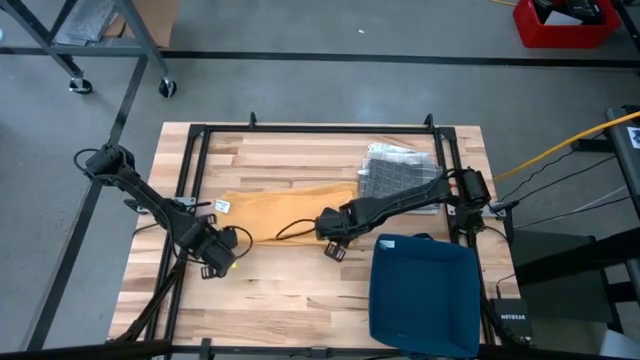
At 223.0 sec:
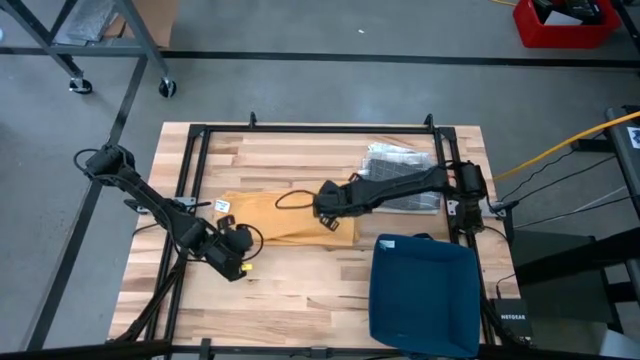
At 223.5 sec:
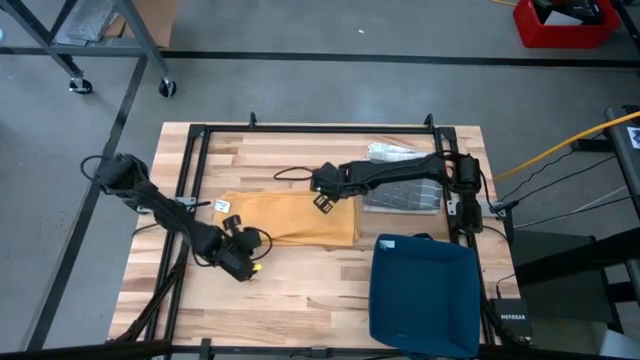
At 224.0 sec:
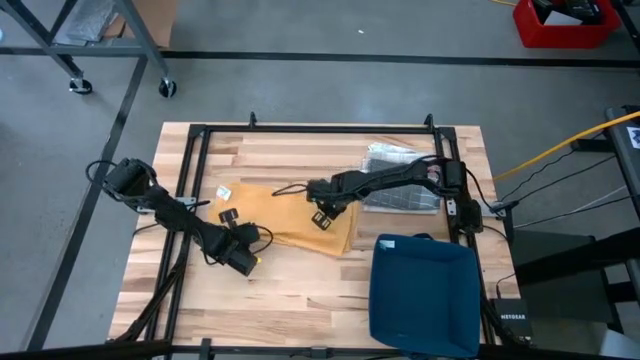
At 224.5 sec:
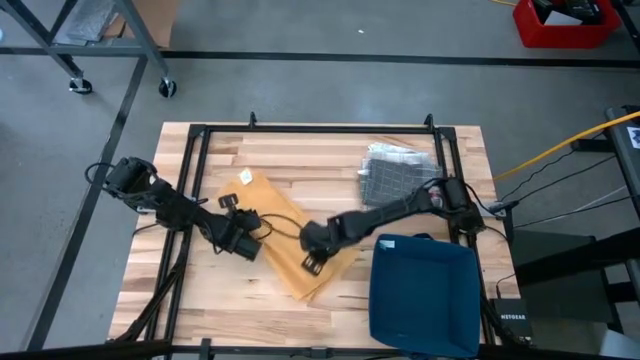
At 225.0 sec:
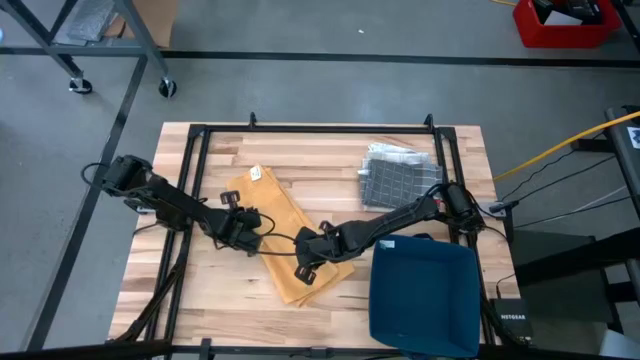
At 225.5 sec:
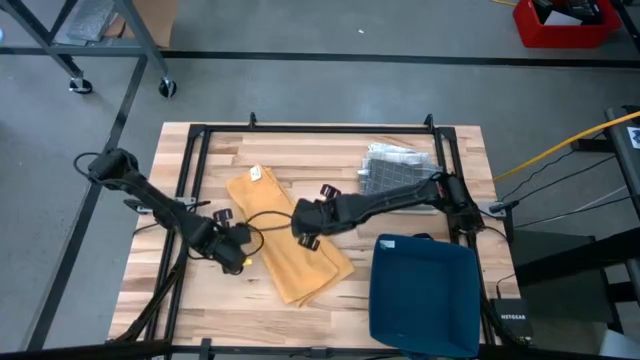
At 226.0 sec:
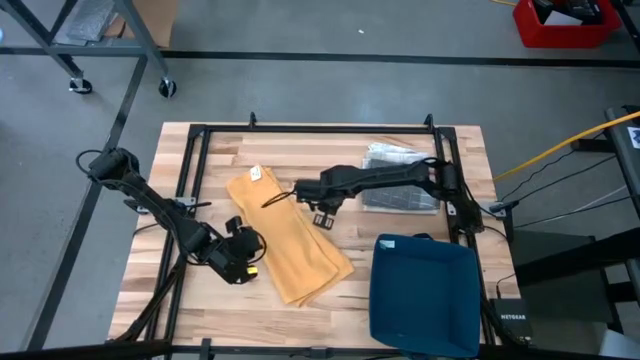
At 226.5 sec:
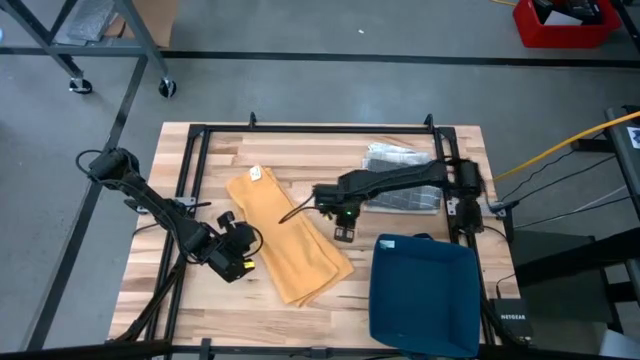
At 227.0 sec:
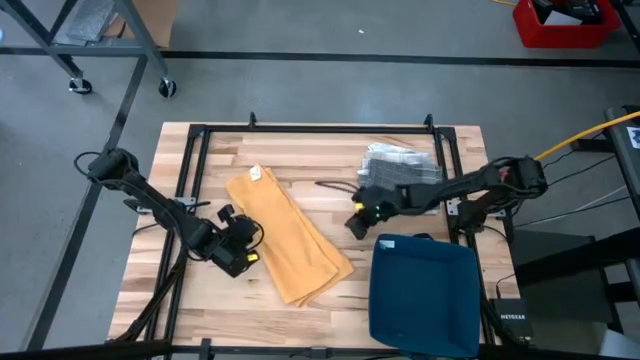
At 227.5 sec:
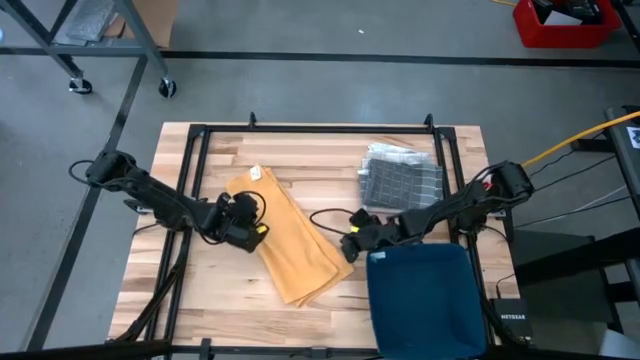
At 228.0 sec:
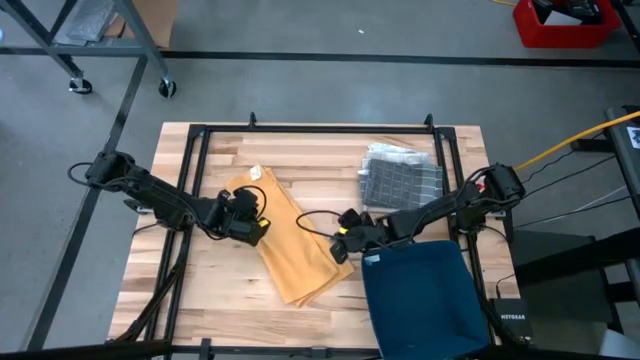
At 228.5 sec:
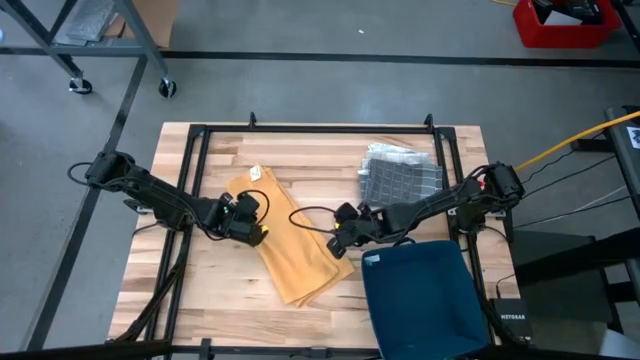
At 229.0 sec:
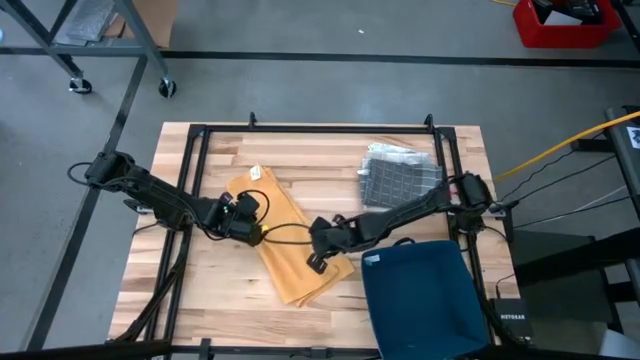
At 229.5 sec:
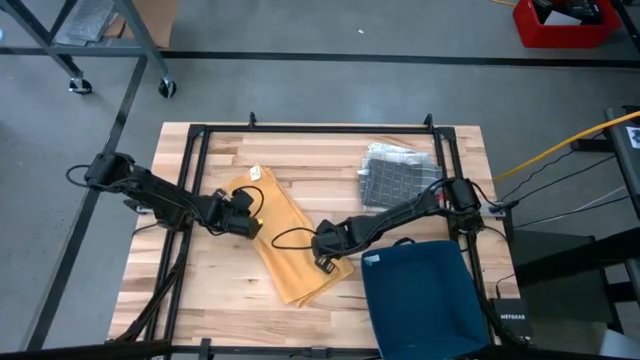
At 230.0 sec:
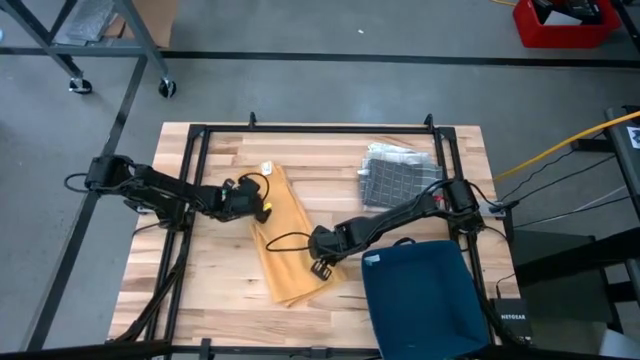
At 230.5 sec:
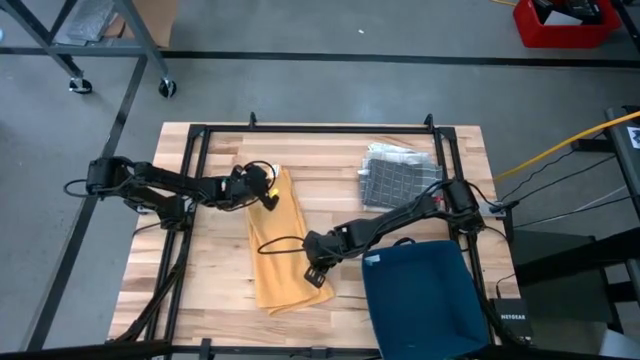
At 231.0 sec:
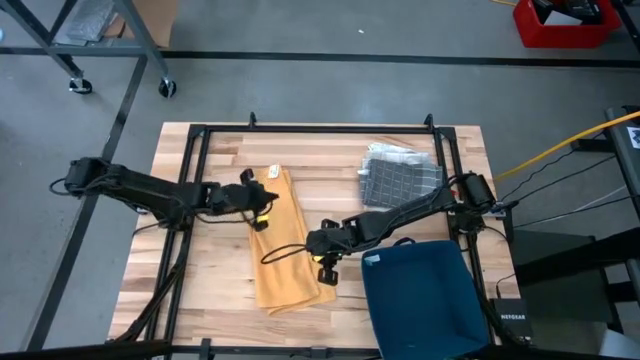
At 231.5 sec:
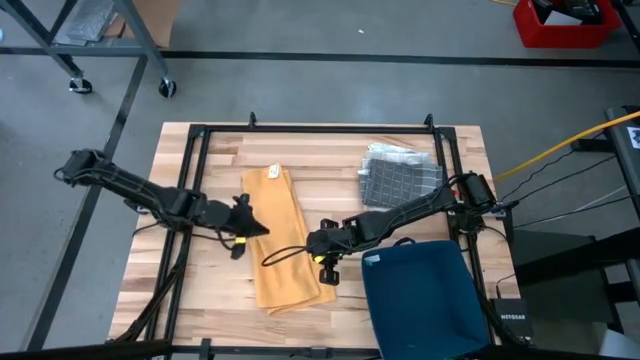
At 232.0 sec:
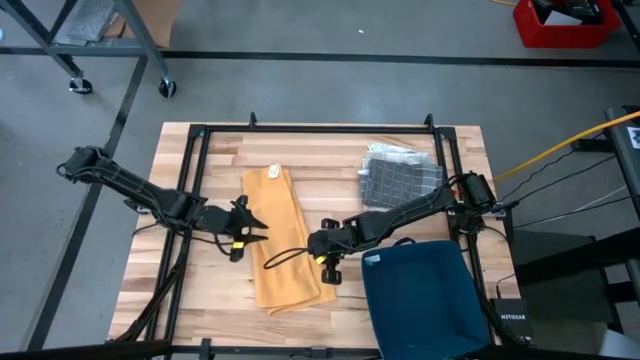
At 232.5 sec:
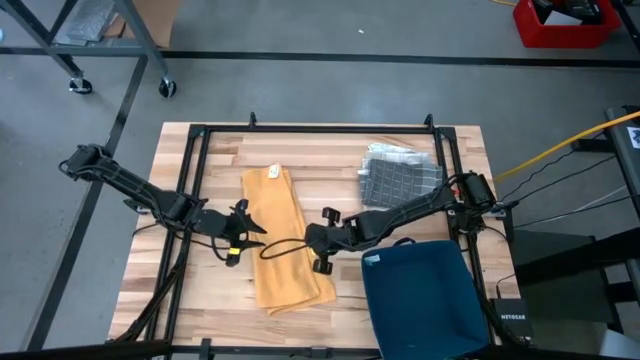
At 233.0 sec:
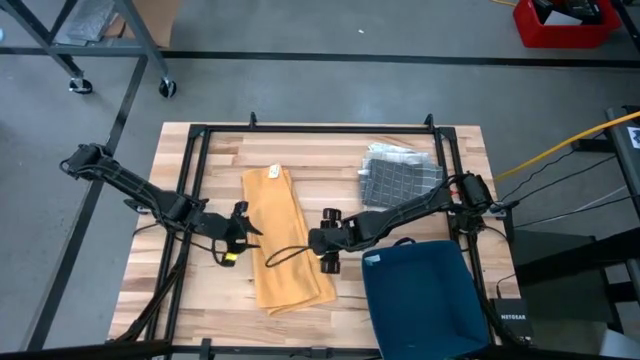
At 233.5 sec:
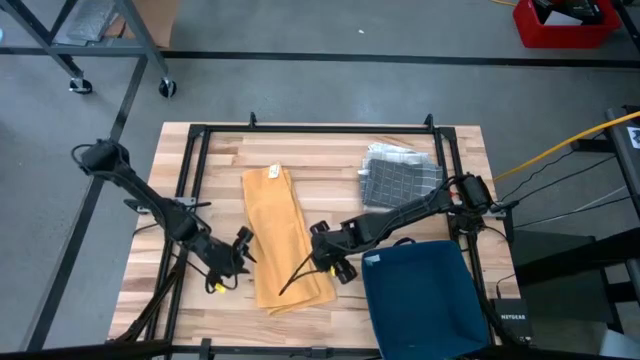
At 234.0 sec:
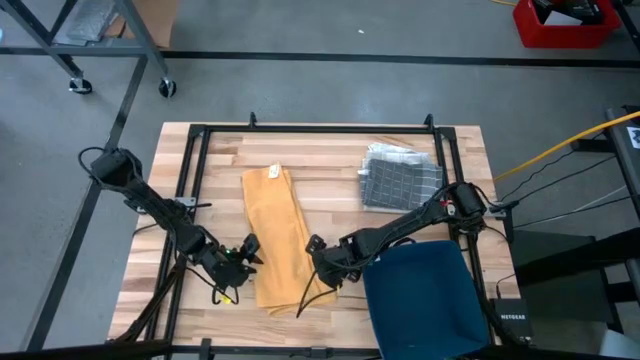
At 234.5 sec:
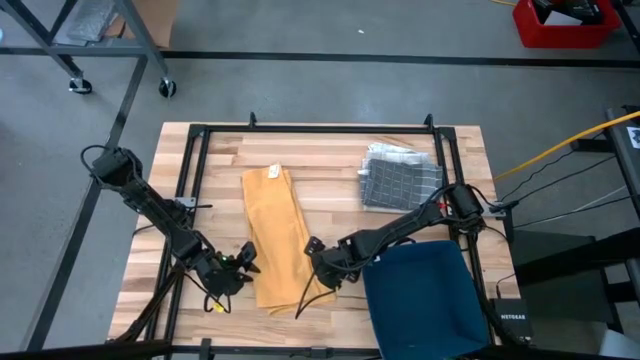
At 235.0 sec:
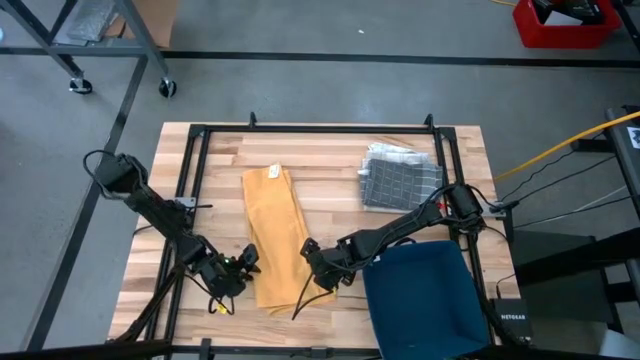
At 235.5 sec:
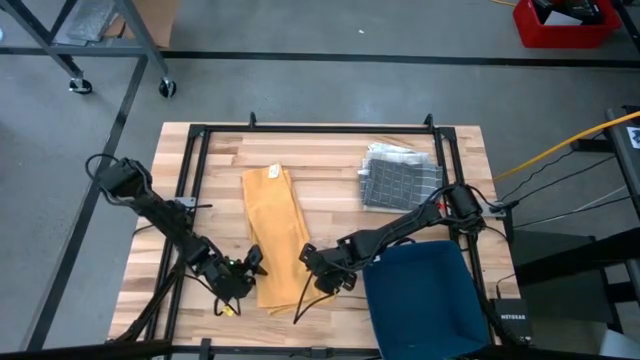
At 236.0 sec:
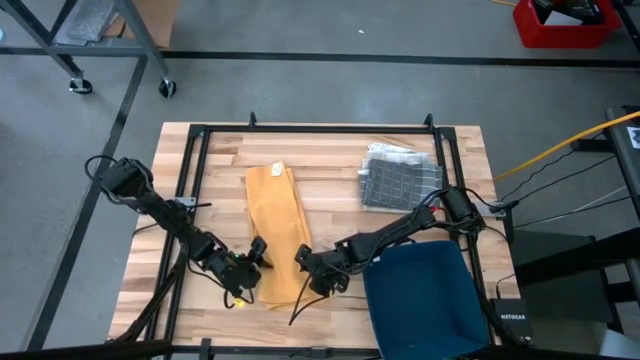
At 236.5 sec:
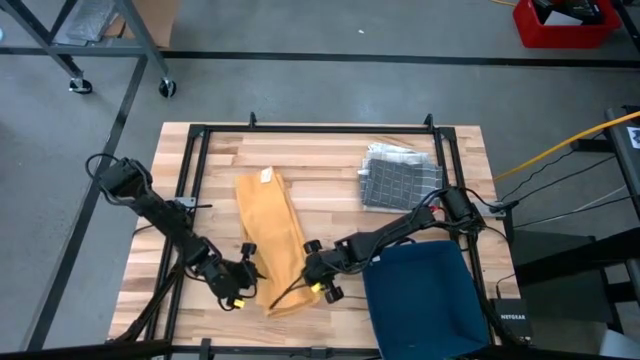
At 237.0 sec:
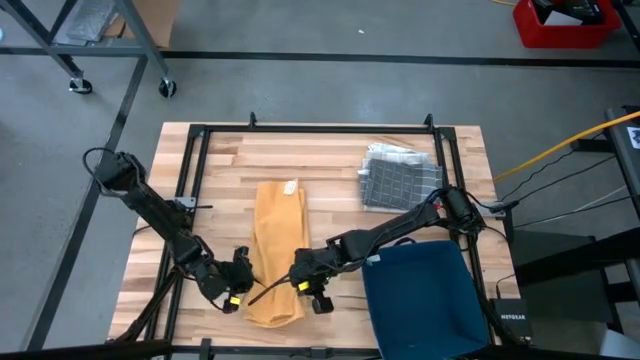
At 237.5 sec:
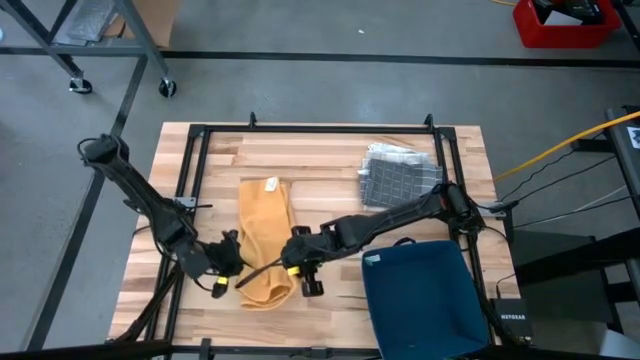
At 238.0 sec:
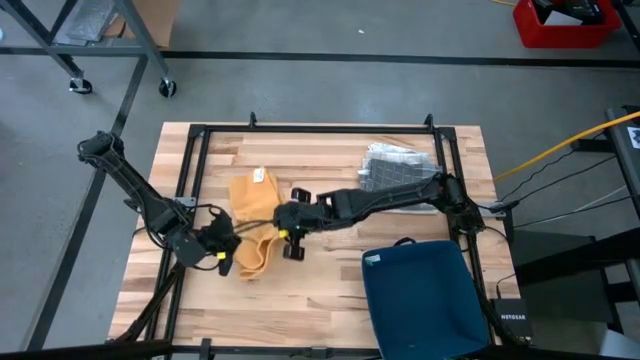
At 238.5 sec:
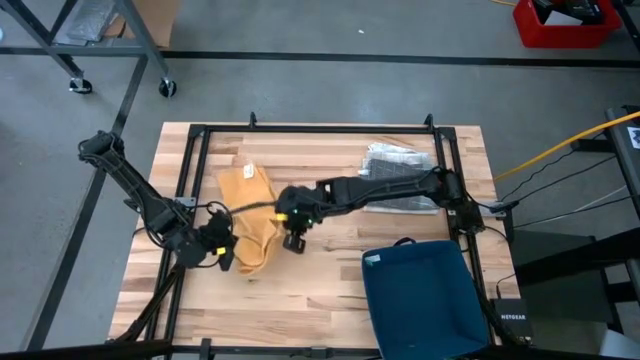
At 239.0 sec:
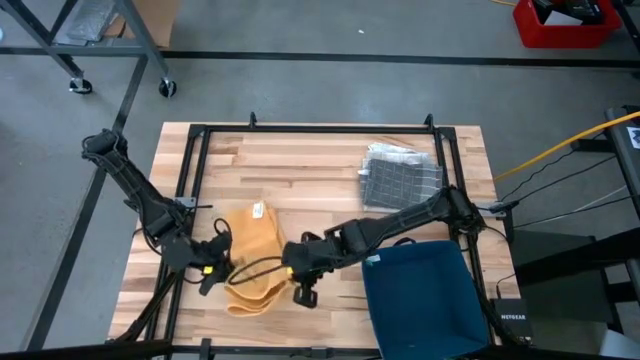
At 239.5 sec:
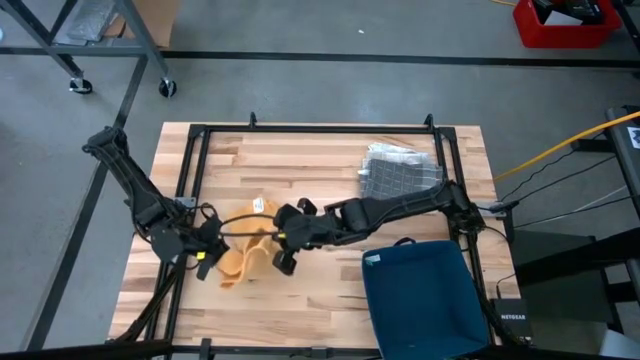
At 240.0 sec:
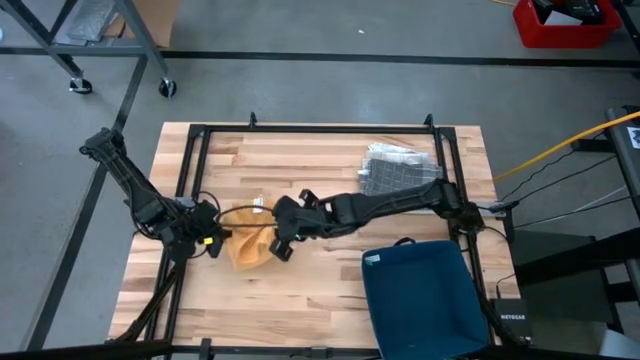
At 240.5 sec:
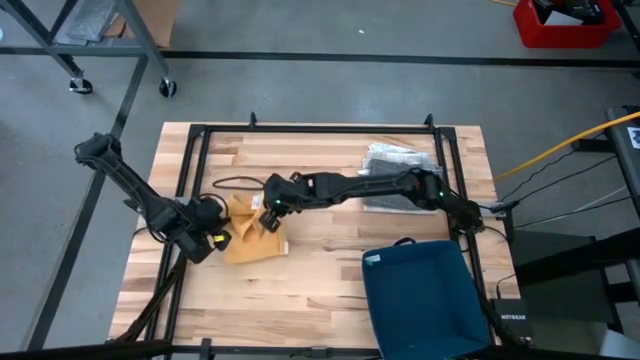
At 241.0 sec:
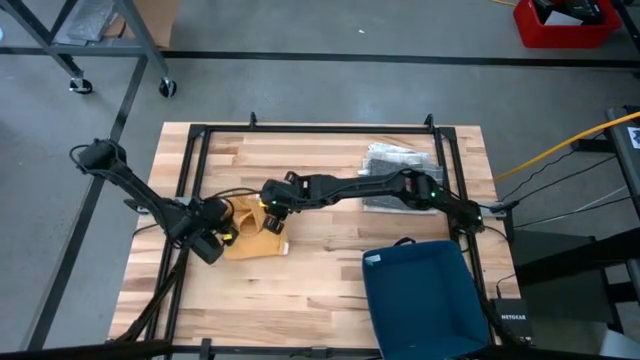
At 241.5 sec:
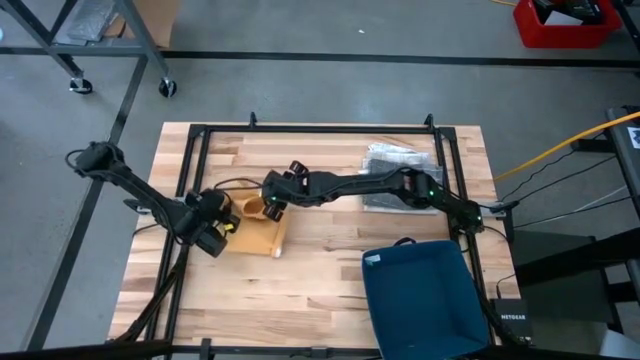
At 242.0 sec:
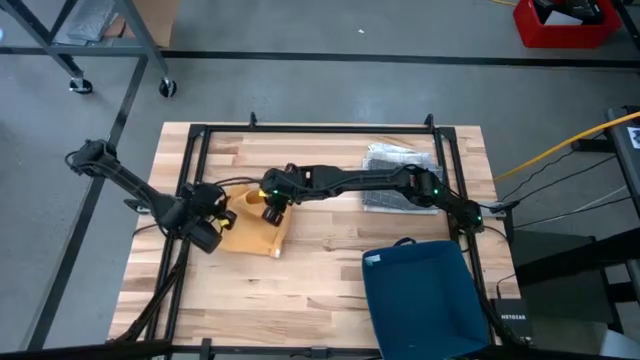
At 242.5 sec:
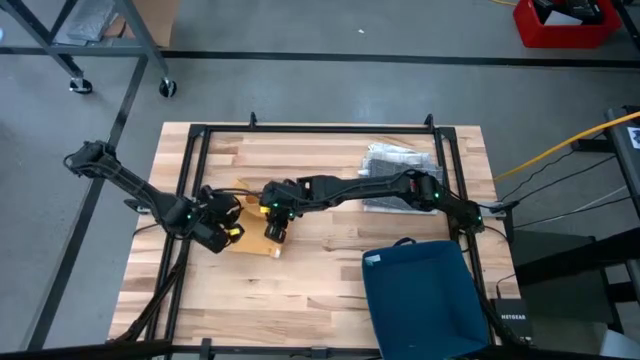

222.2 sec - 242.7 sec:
Task: Fold towel
Fold yellow towel
